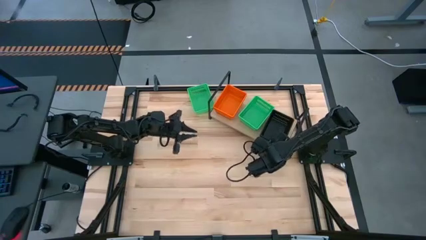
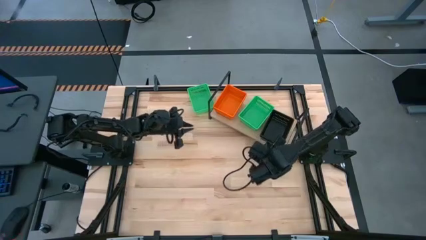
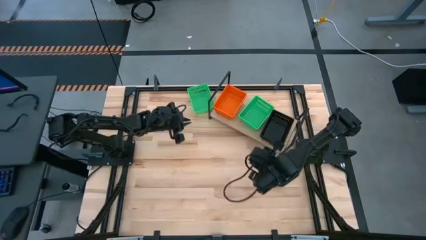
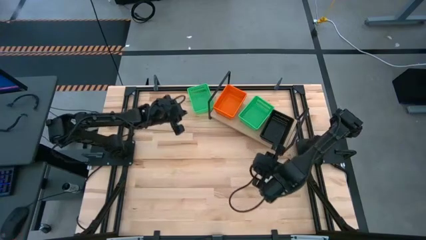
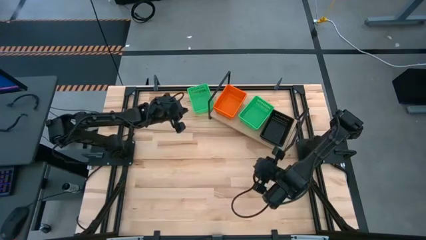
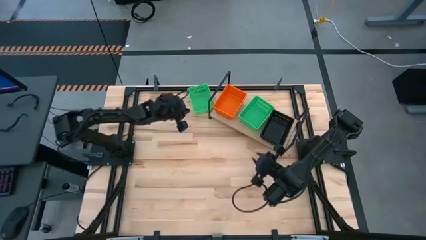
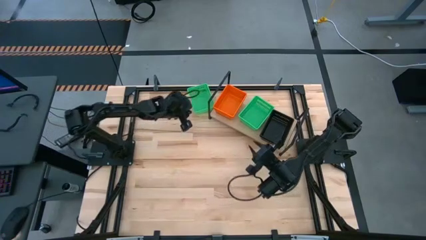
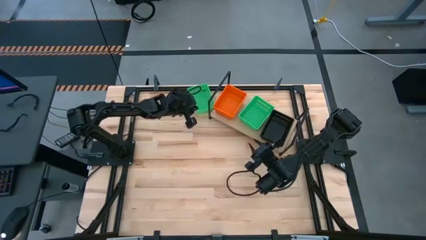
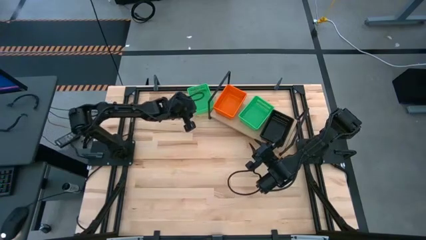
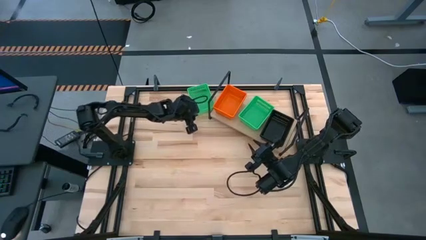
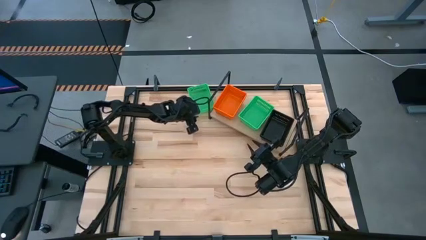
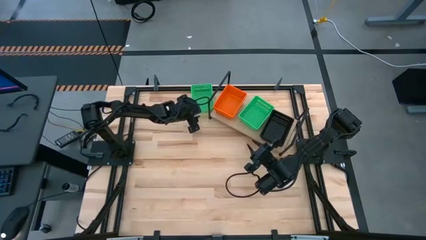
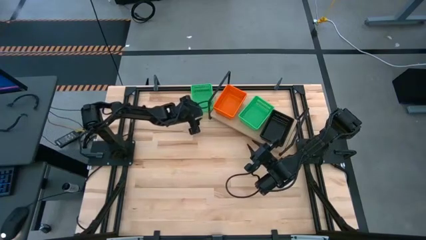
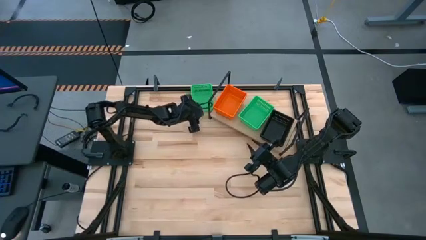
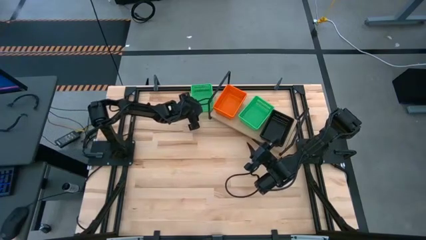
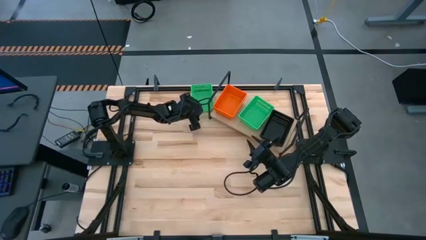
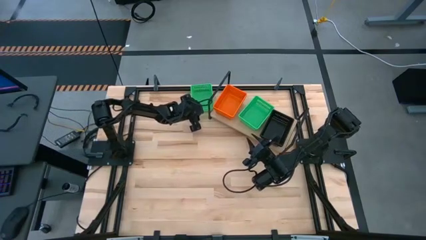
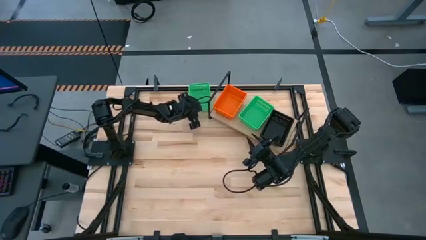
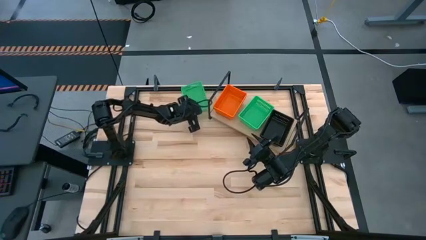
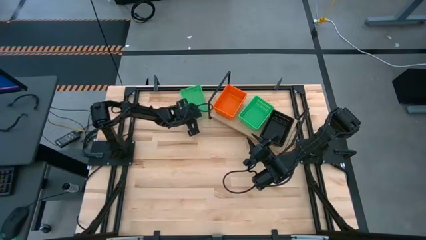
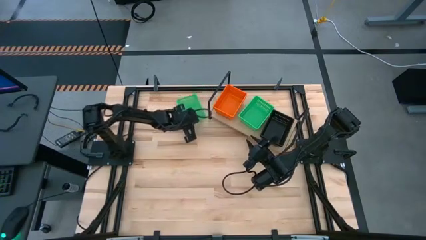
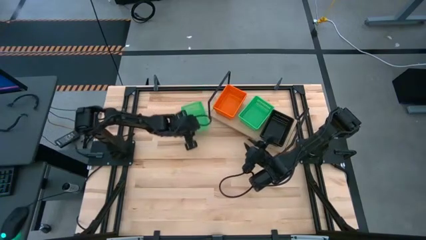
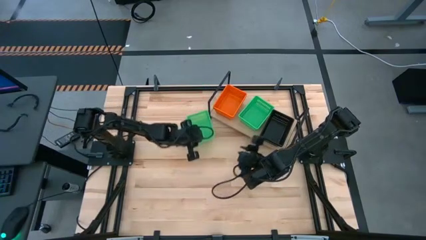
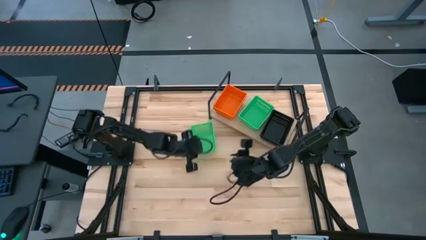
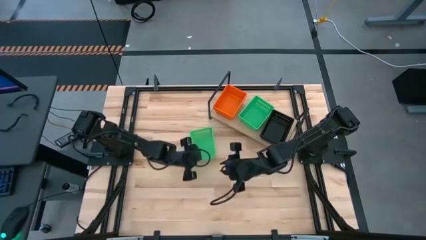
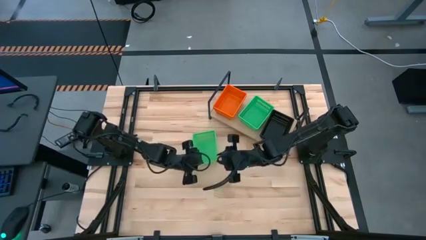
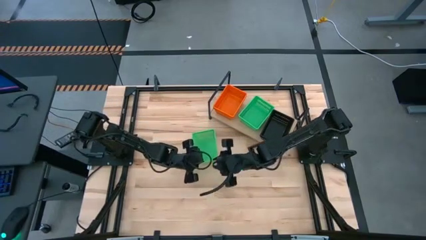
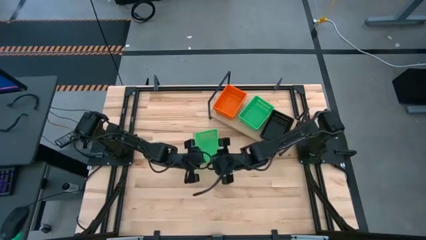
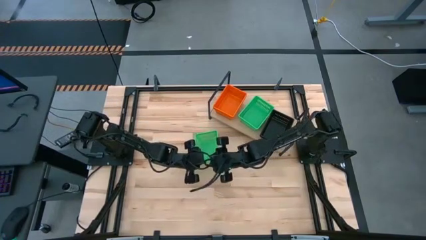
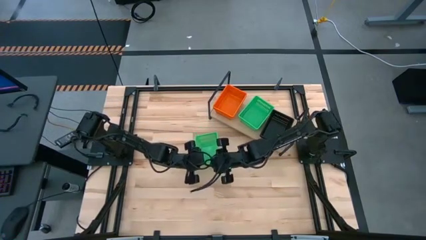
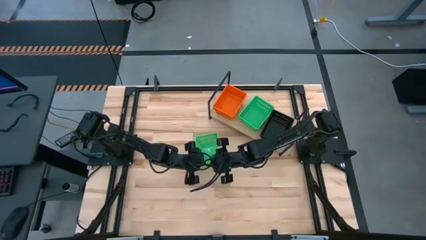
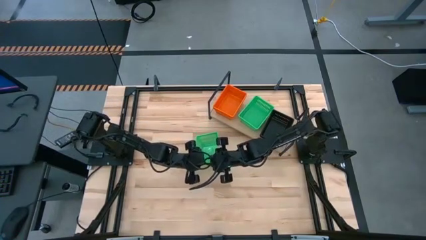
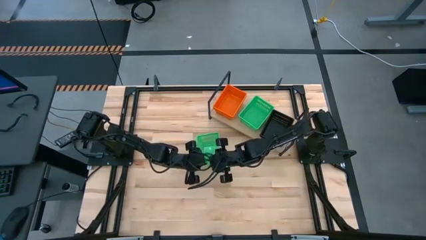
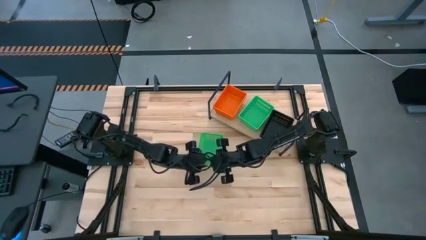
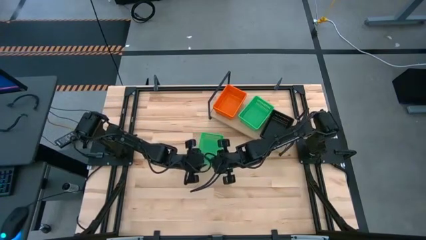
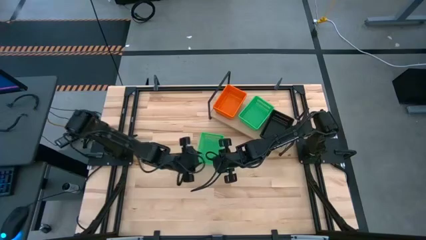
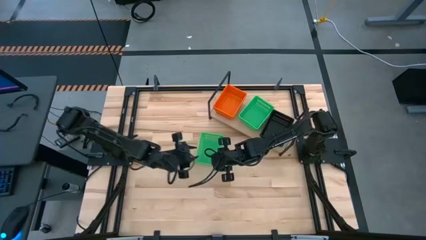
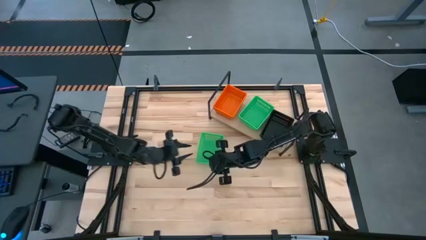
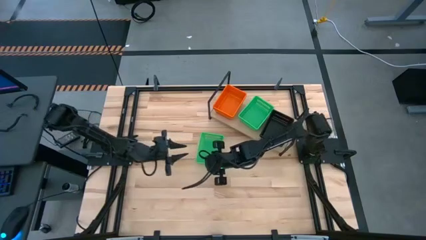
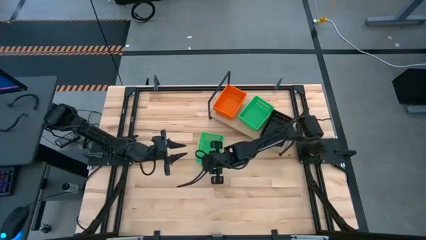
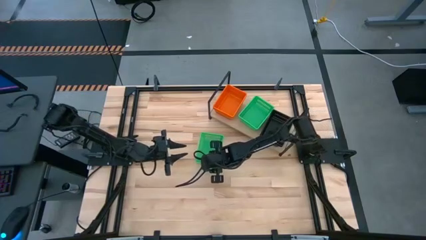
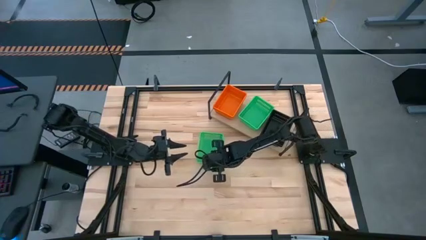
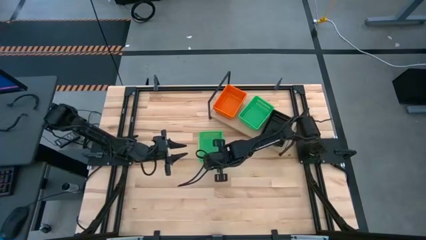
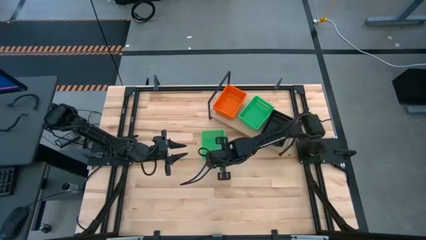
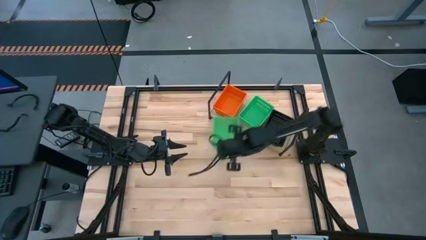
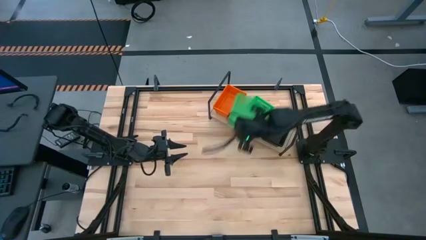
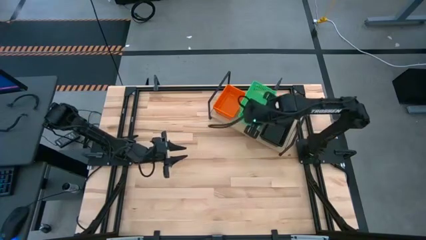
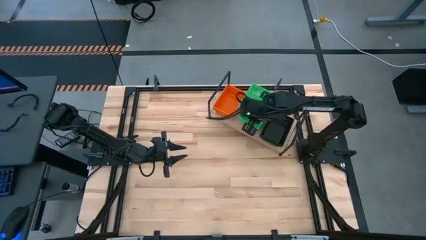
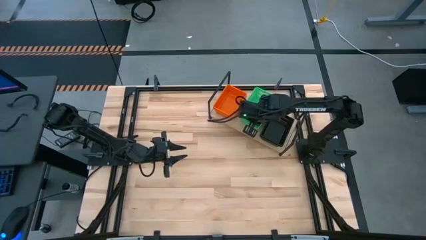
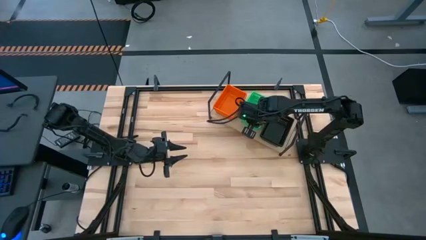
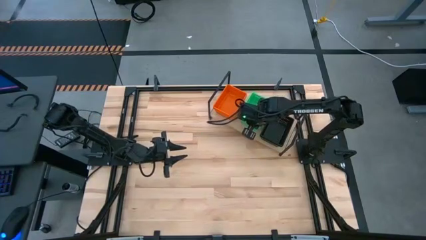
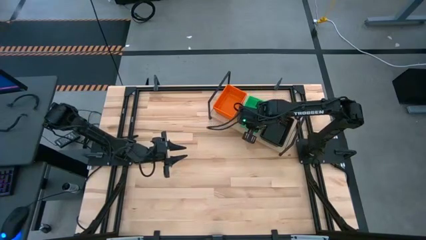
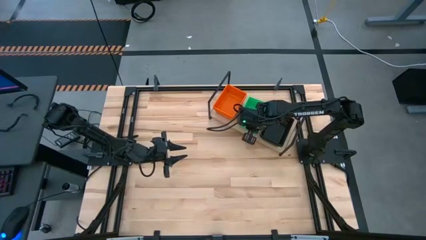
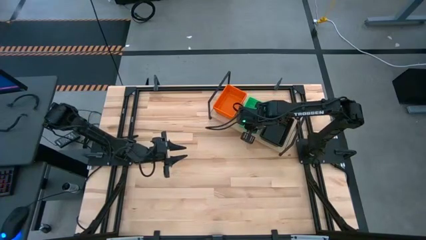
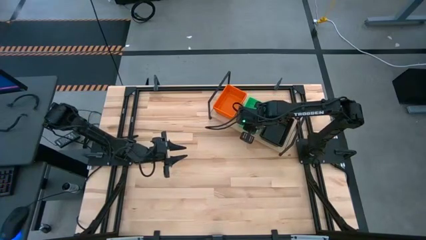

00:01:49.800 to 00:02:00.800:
Task: Stack baskets on shelf by color
Stack the green basket on top of the green basket on the shelf

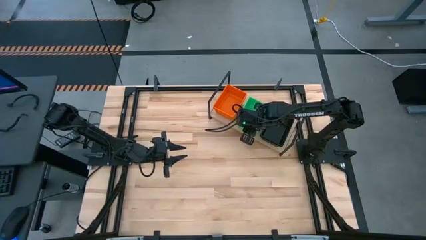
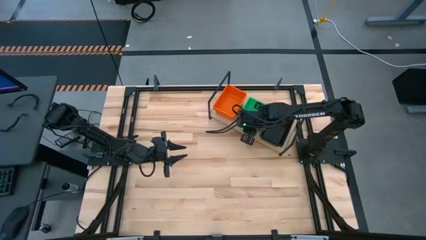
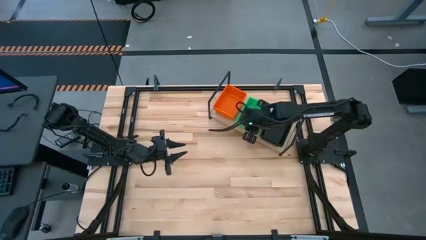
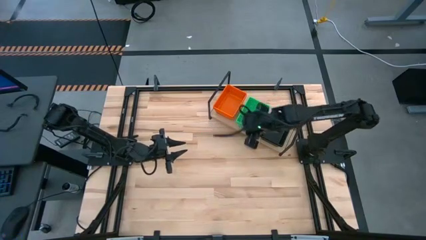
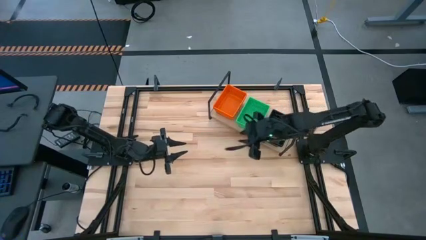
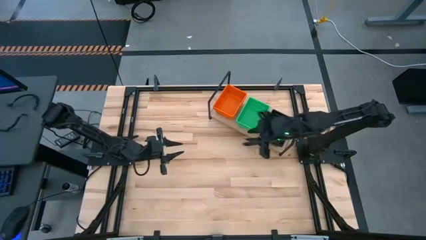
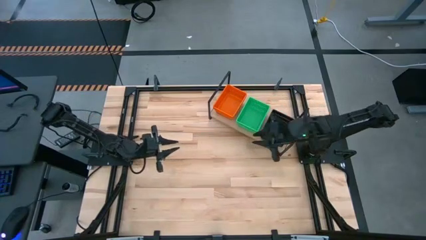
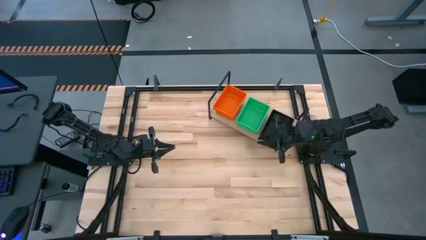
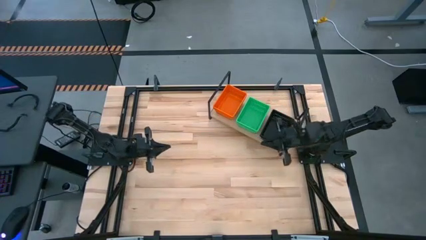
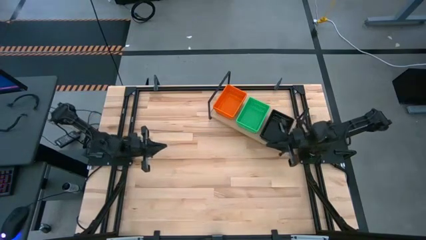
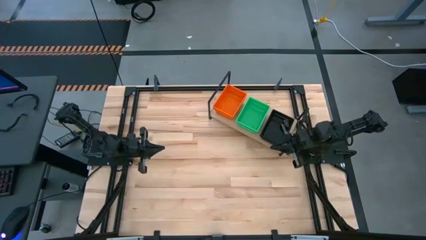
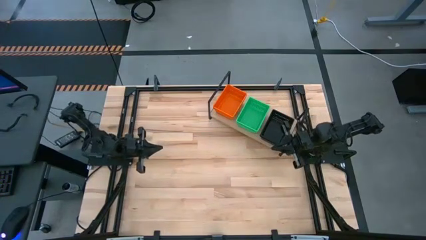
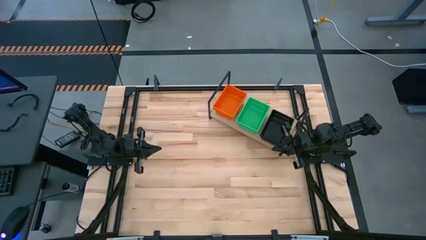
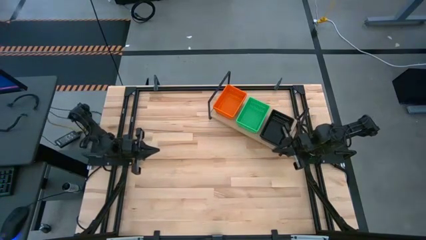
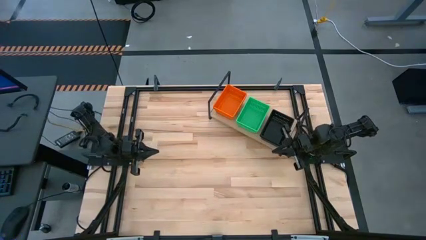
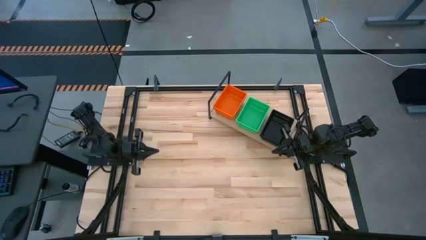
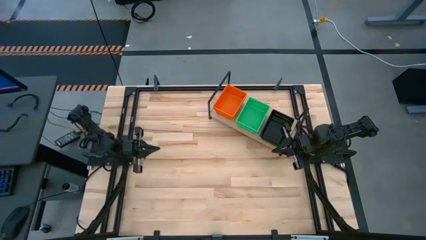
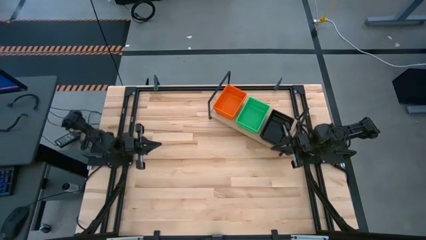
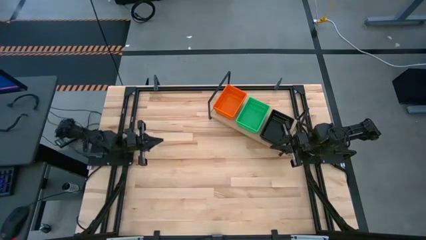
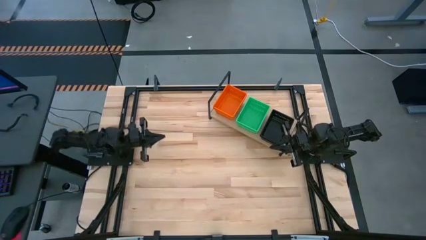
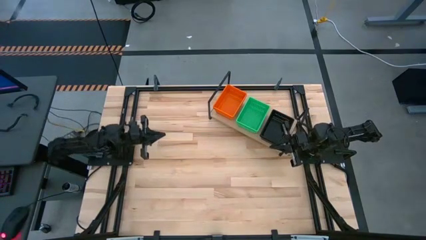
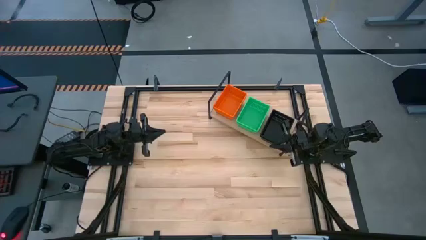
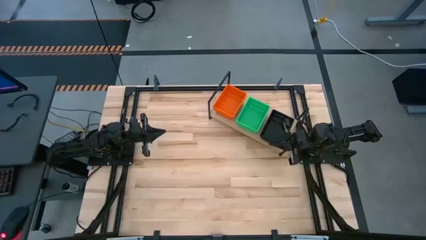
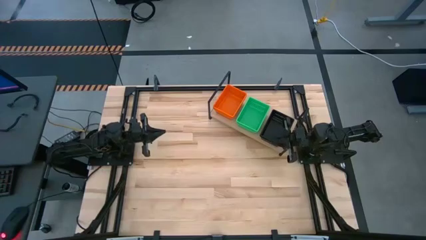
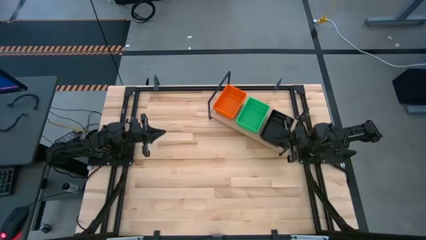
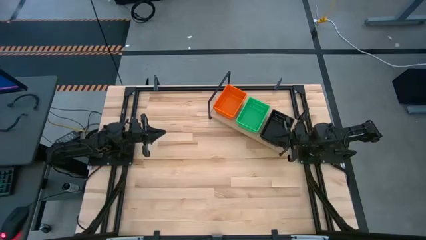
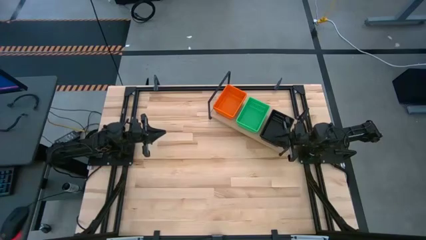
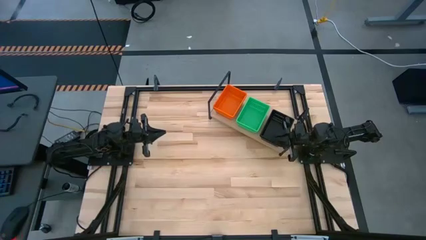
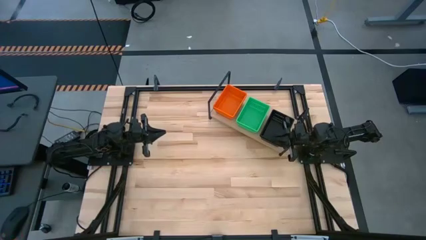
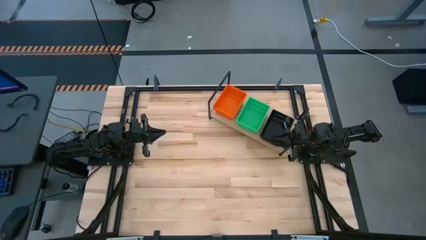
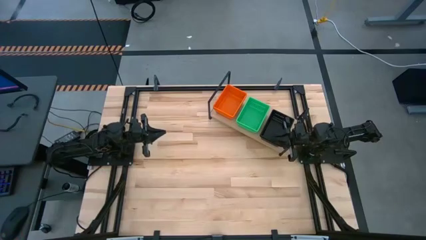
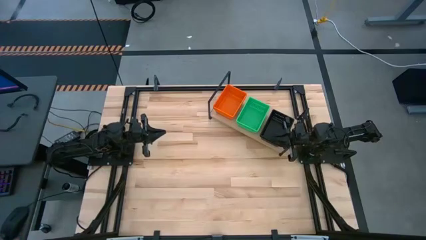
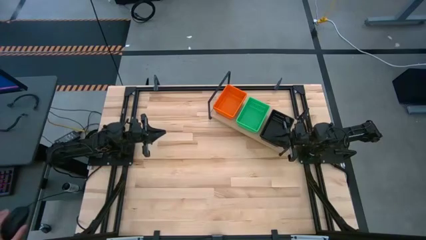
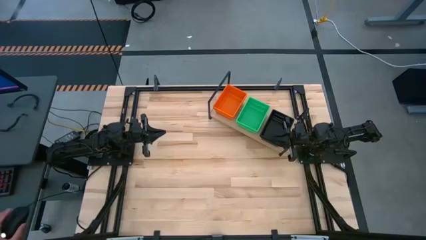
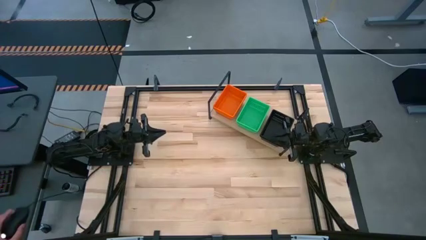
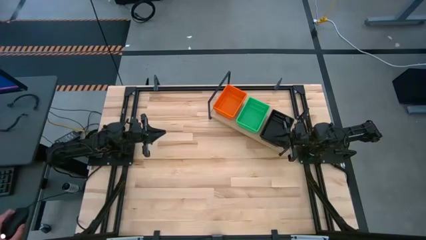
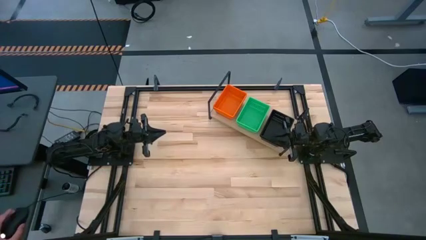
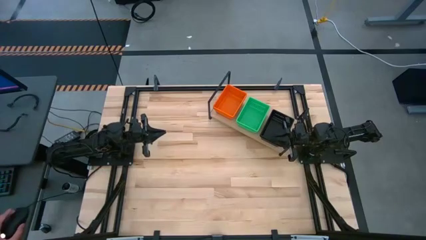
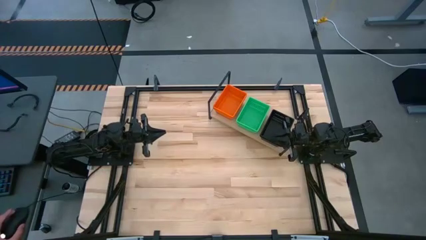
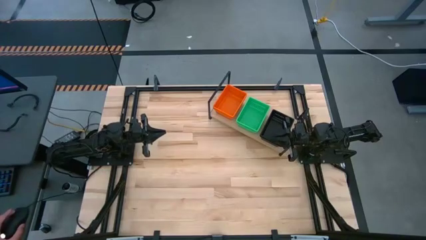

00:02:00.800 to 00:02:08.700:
Return to Home Position
